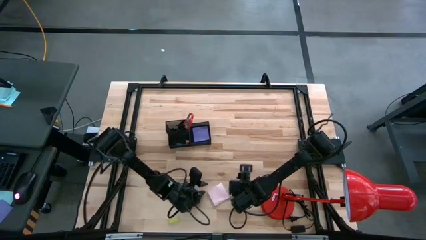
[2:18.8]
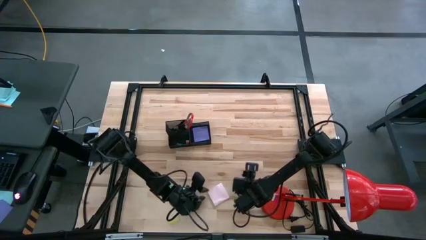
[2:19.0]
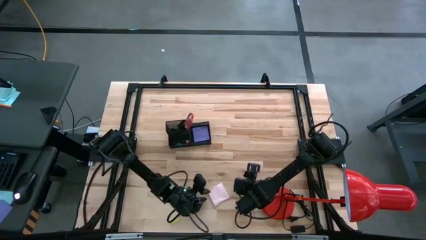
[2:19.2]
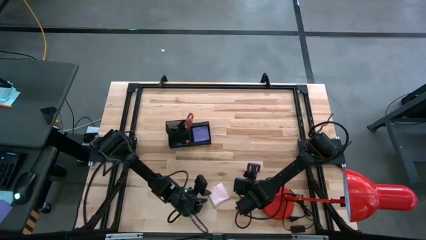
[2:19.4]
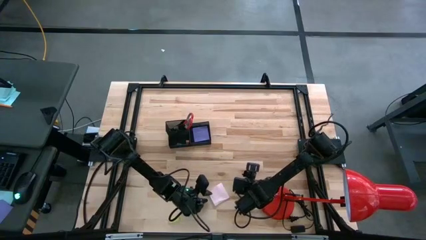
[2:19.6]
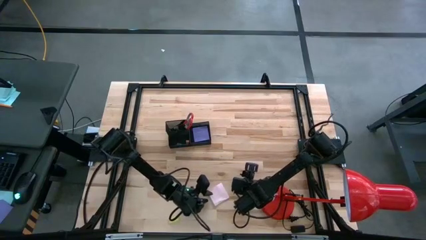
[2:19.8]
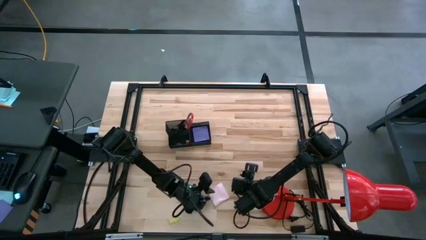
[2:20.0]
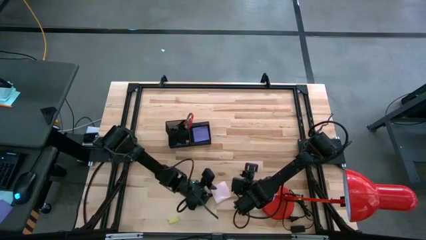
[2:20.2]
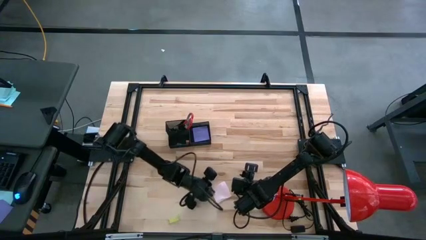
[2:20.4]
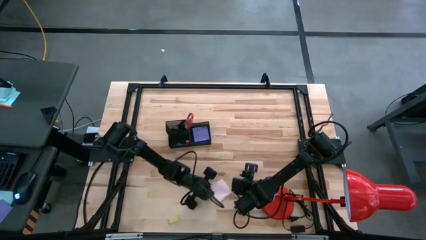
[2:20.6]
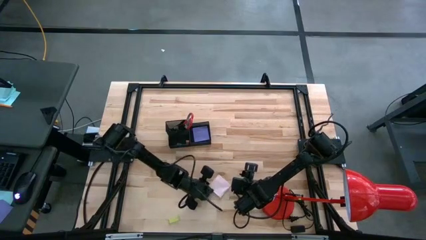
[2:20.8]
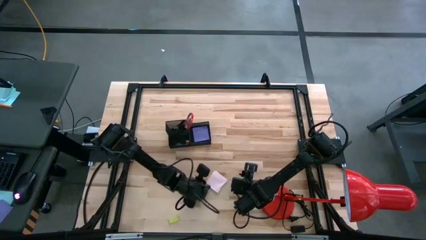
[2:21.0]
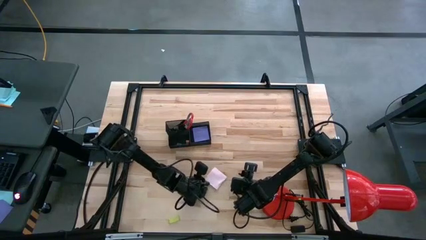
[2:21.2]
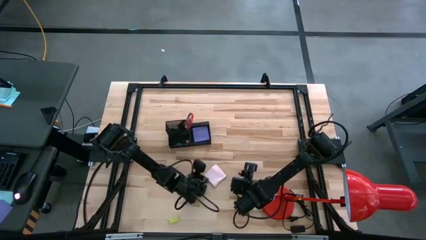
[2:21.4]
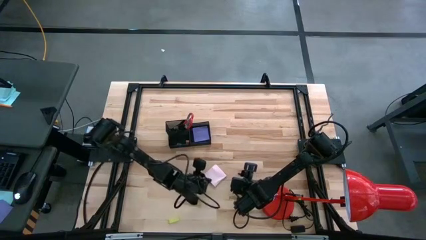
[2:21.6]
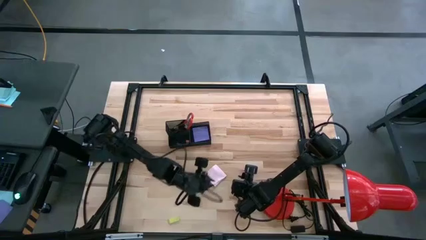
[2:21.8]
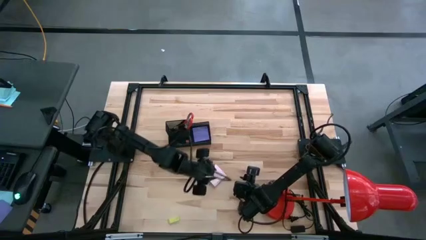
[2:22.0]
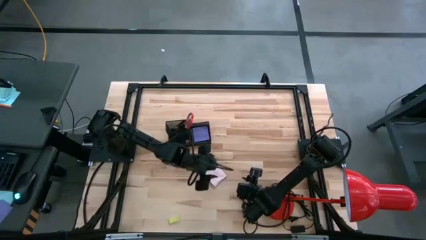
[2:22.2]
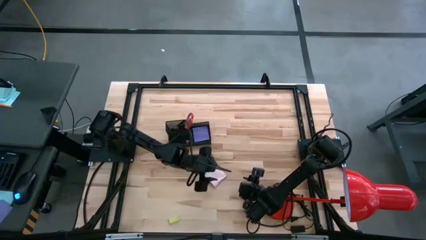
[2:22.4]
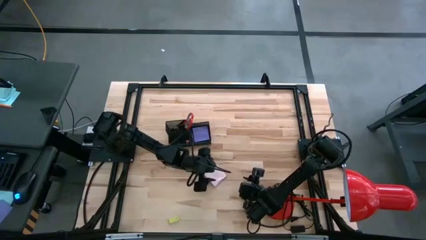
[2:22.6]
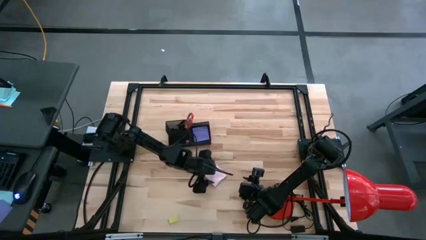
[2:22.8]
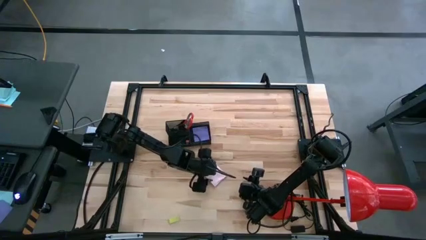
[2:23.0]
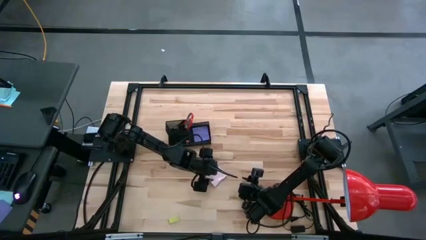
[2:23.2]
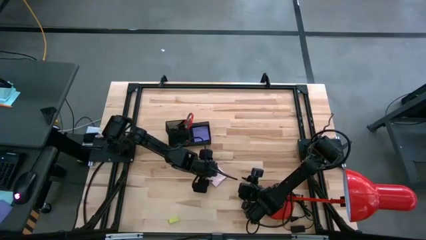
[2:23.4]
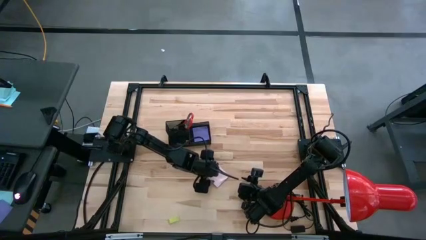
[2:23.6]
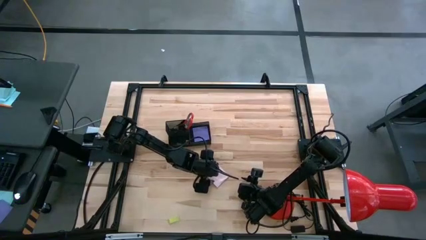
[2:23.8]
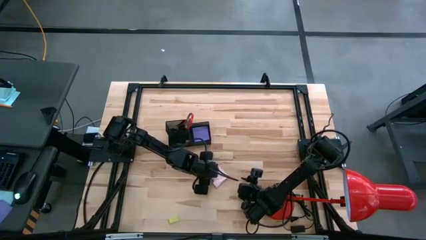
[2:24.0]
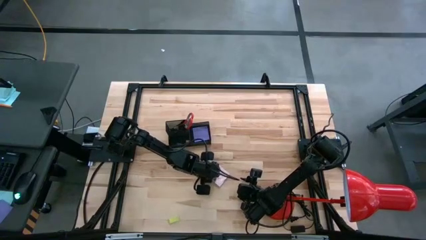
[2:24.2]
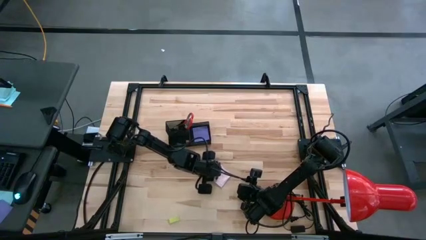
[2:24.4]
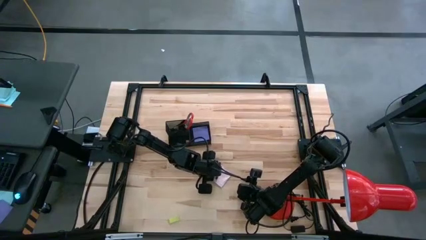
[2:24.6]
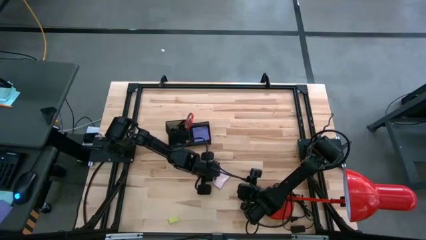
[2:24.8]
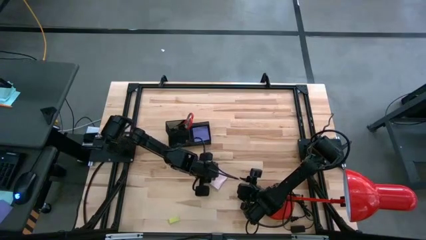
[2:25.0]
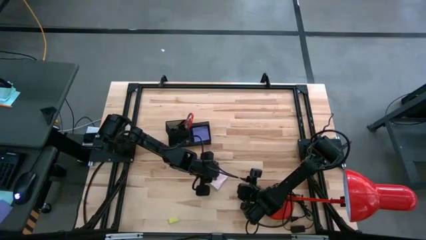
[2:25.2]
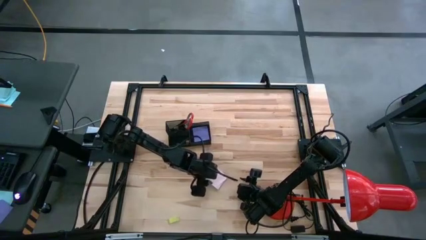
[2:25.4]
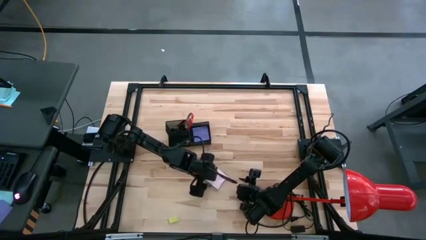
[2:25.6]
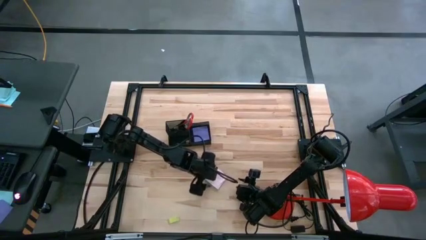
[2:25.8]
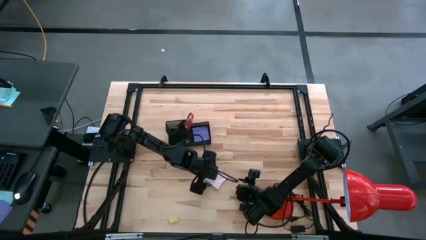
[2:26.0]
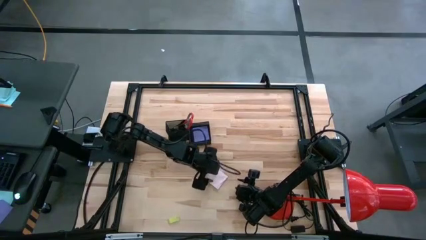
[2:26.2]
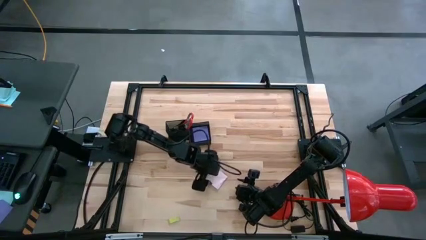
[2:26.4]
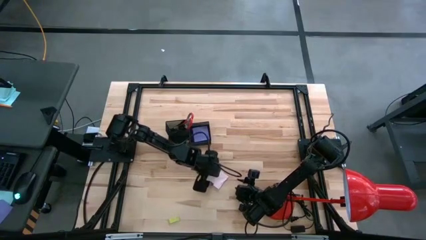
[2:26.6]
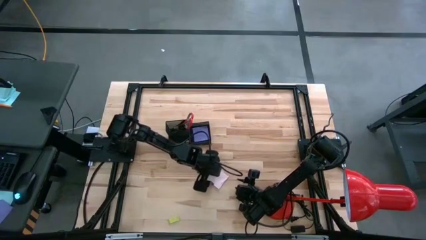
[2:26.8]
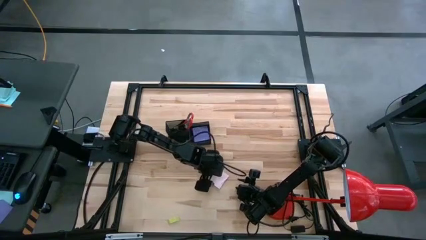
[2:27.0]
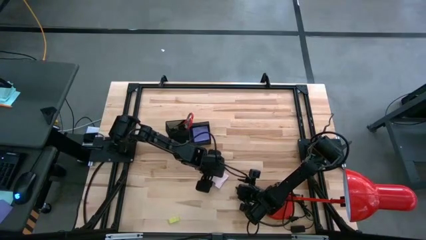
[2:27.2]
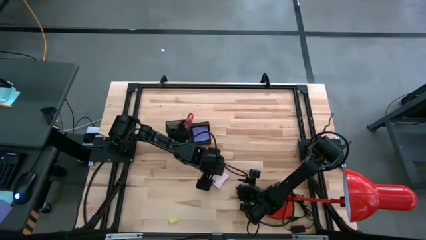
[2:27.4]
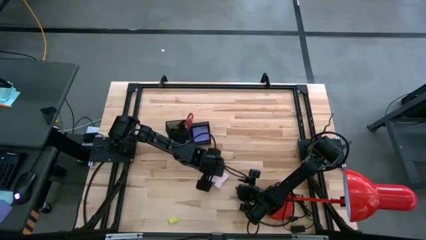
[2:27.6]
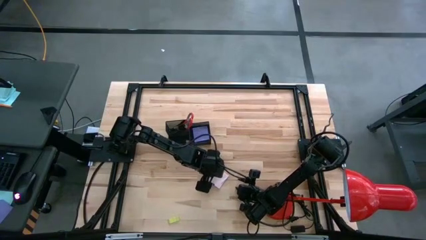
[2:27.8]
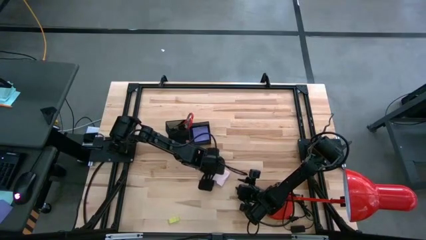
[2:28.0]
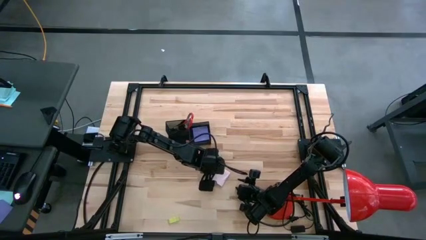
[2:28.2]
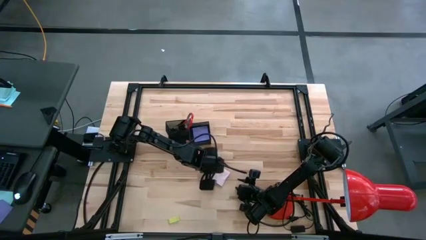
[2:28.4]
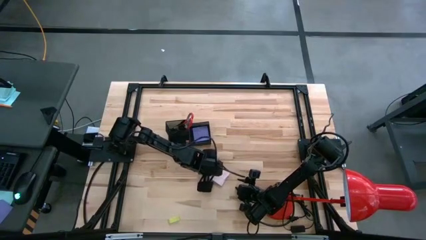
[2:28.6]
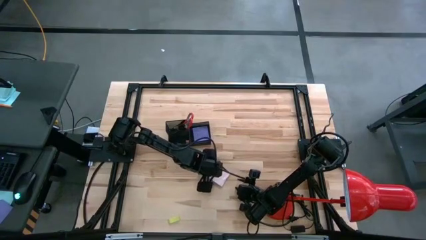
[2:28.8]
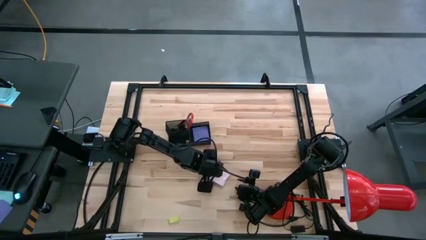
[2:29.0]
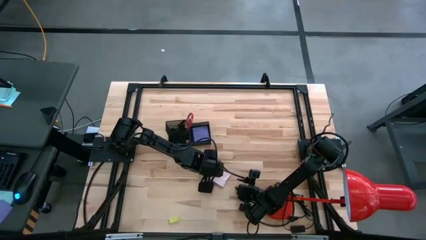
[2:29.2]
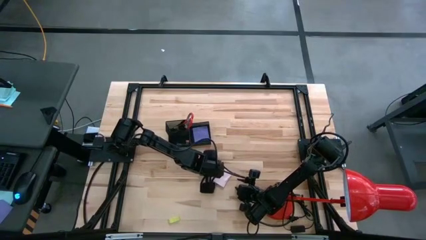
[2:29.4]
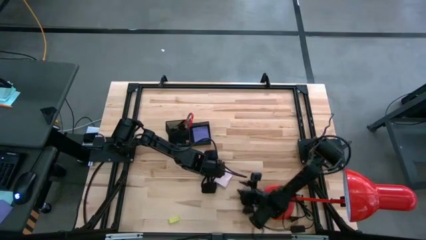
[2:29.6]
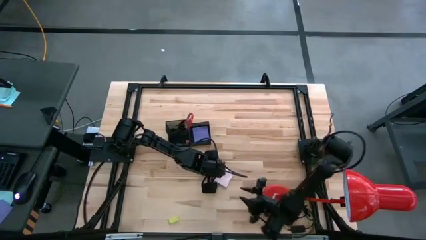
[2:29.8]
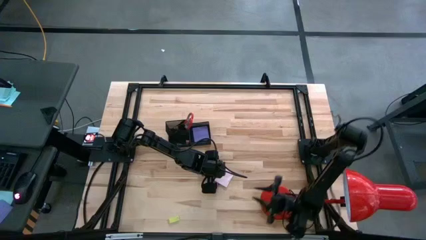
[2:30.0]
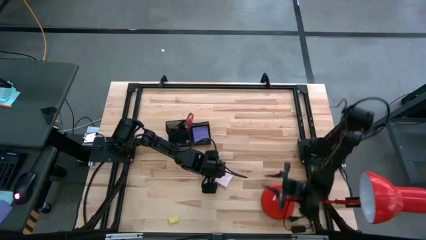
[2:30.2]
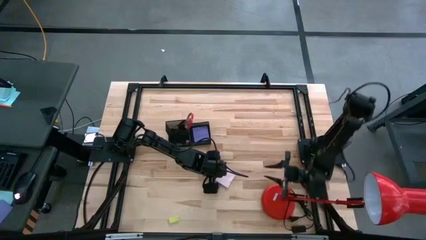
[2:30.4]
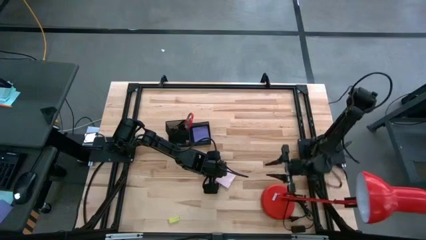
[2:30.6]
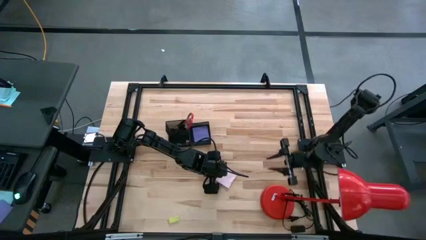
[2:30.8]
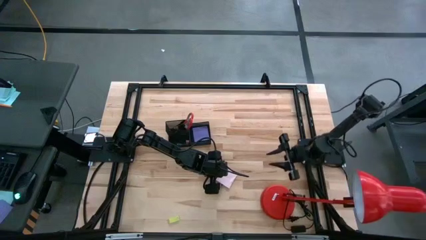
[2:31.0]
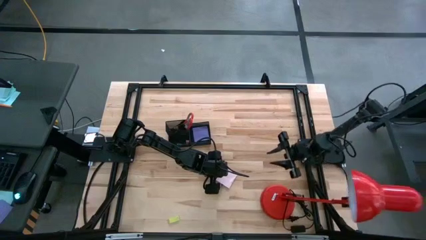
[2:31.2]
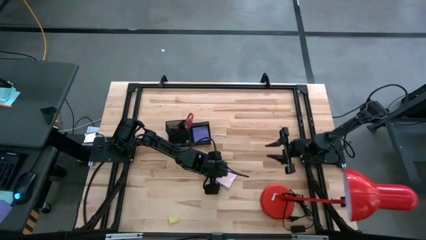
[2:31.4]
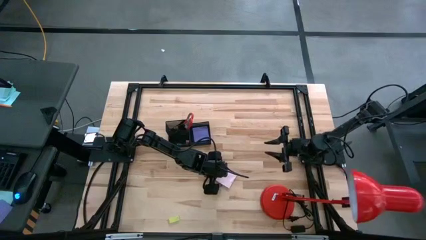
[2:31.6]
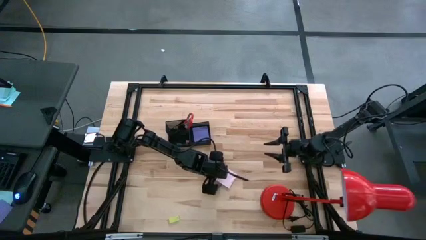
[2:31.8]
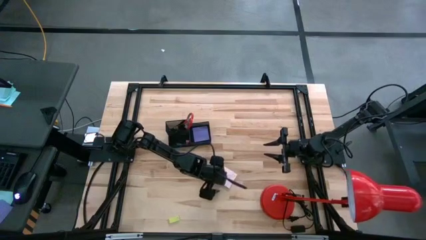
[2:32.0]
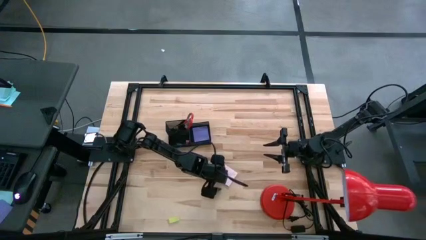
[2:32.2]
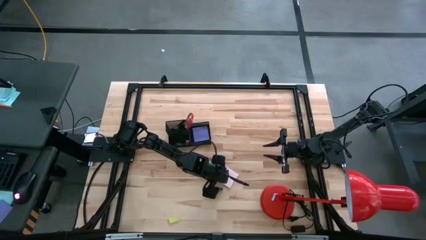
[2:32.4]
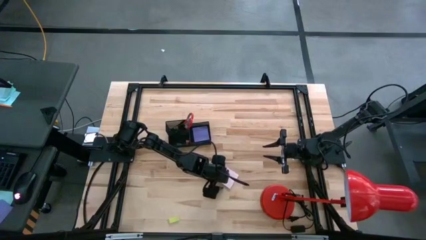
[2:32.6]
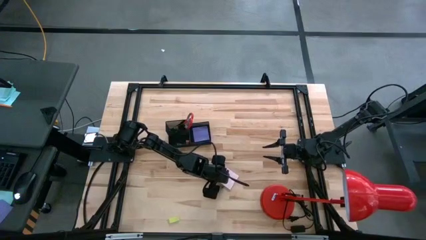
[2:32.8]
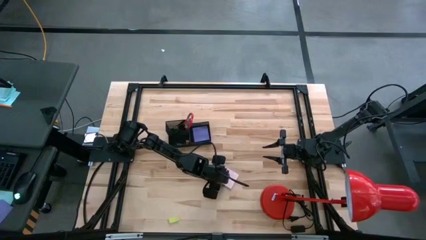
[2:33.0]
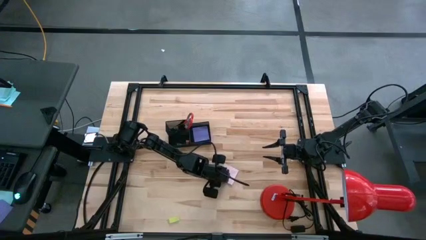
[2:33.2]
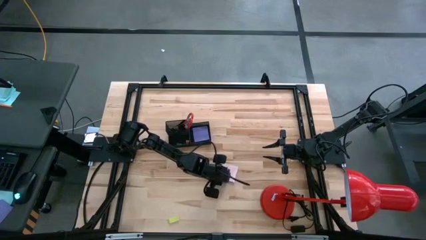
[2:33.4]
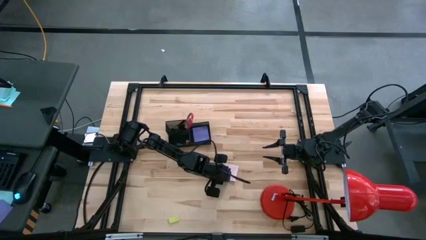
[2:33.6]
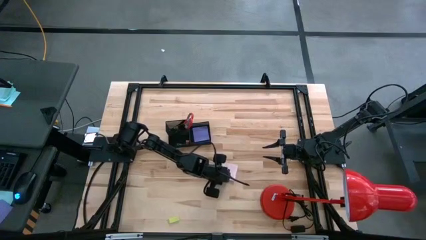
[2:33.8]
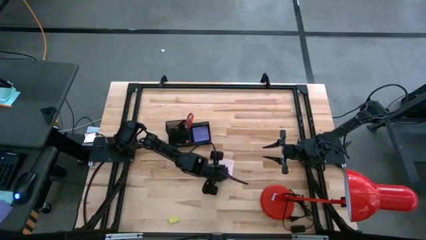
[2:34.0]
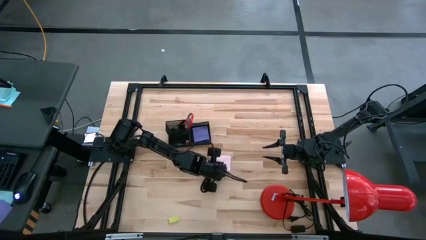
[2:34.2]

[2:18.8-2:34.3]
Task: Pick and place office supplies into organizer
Put the pink sticky note into the desk organizer
